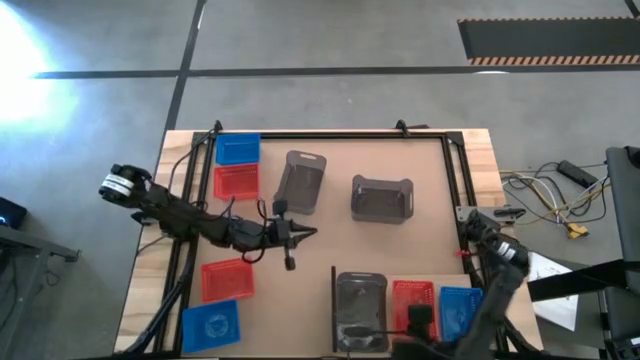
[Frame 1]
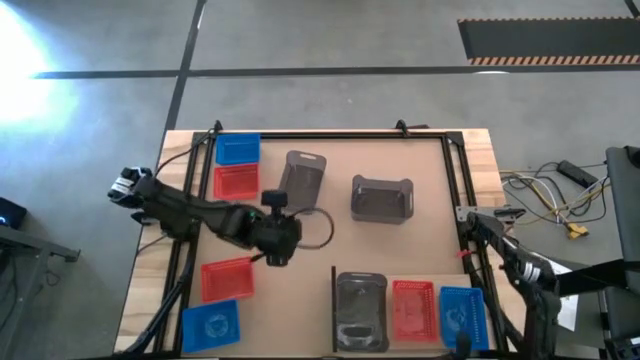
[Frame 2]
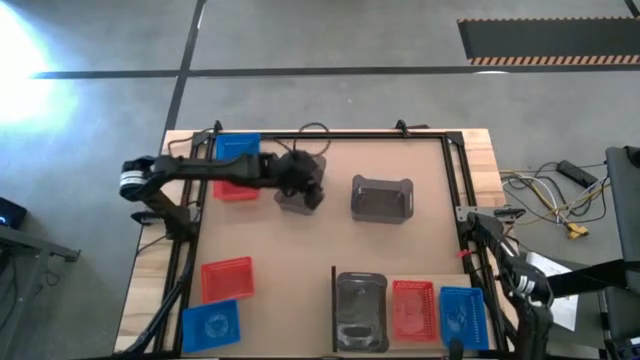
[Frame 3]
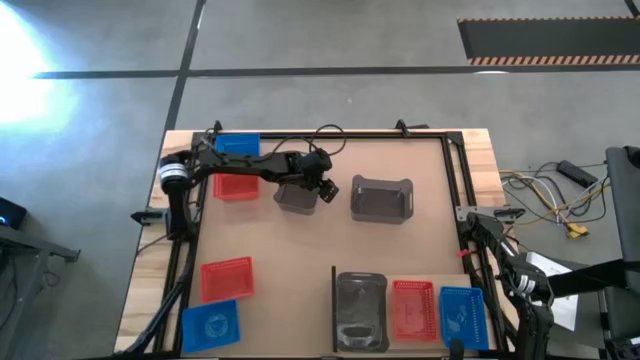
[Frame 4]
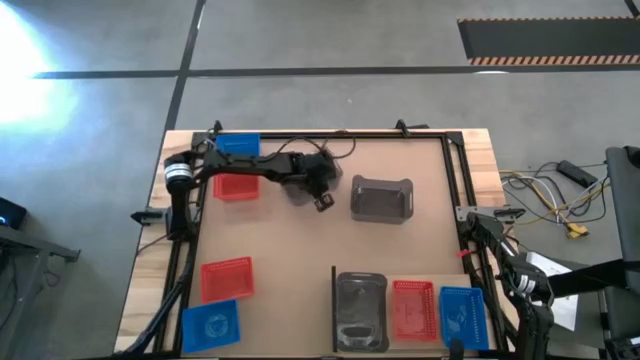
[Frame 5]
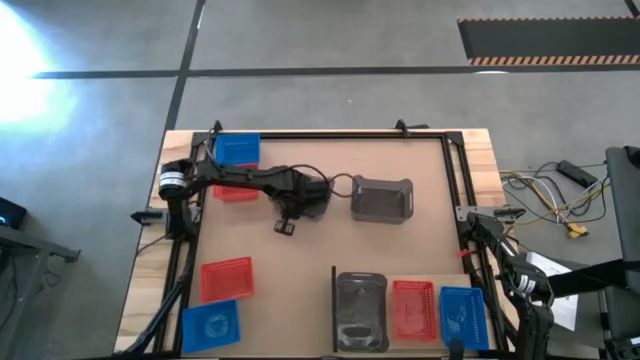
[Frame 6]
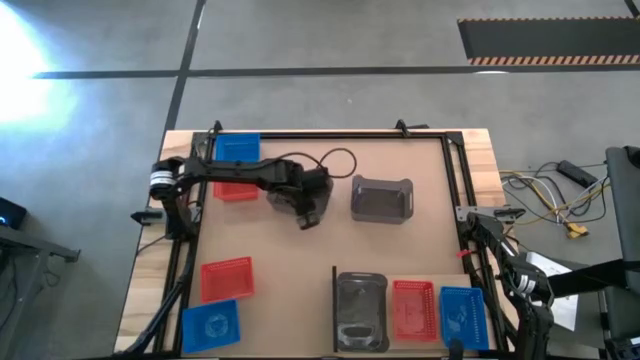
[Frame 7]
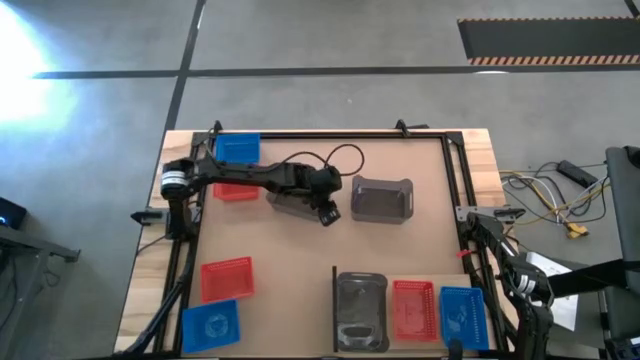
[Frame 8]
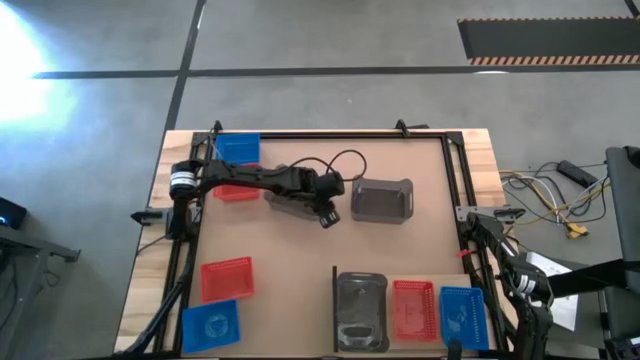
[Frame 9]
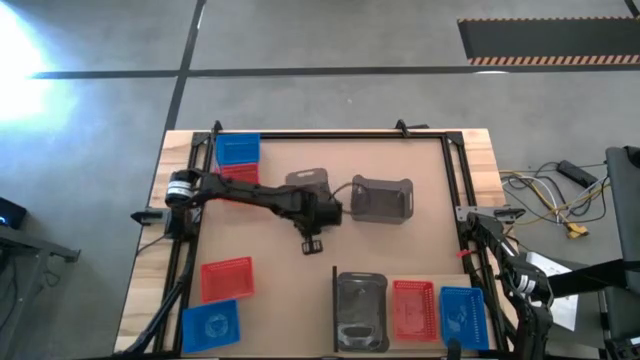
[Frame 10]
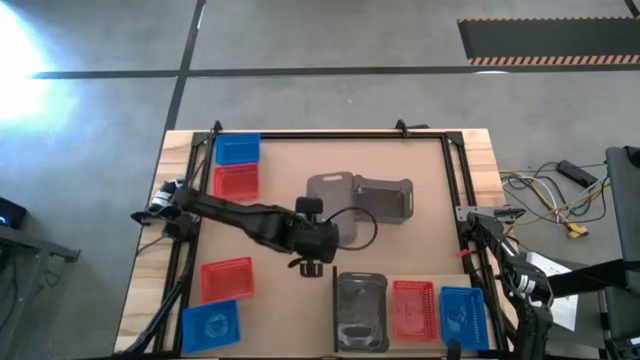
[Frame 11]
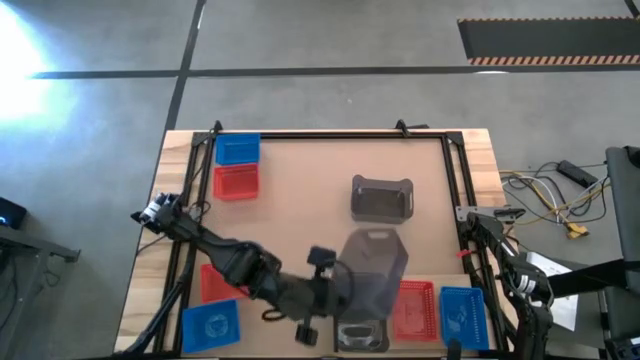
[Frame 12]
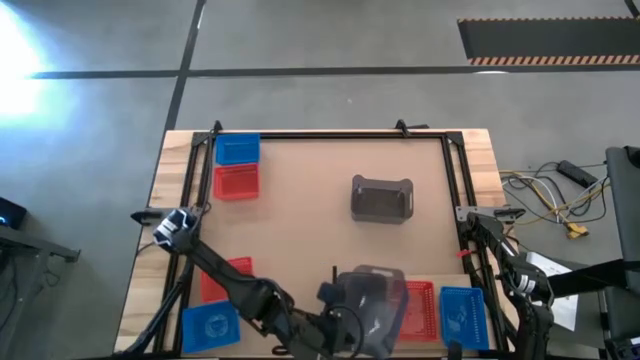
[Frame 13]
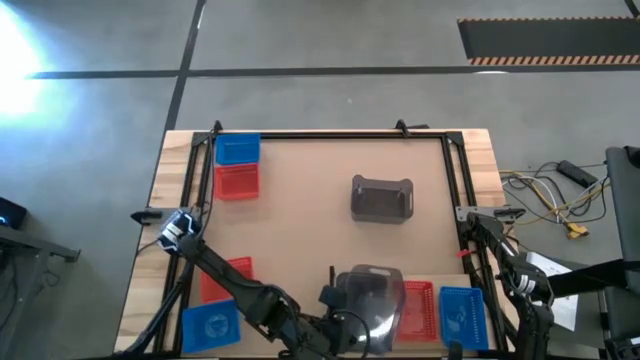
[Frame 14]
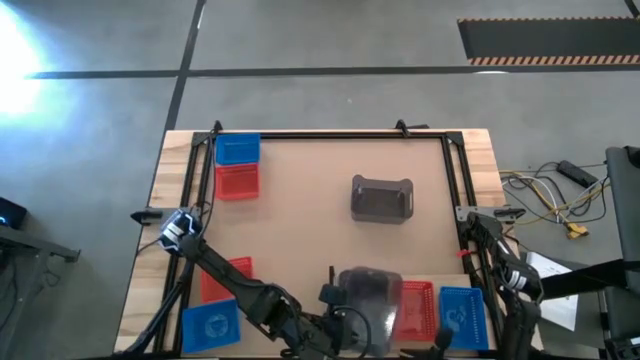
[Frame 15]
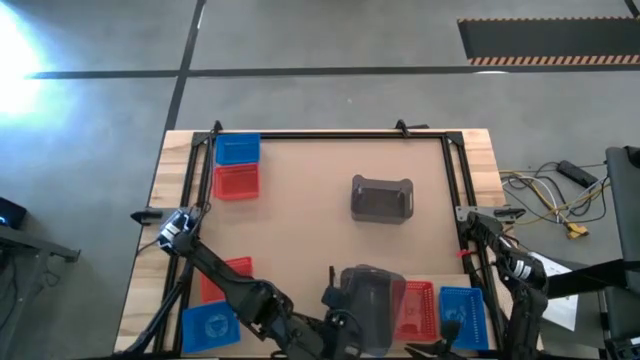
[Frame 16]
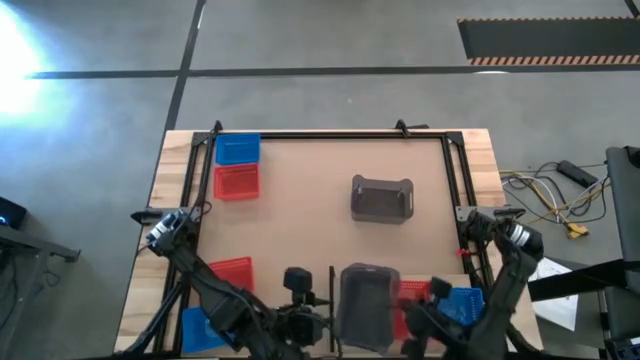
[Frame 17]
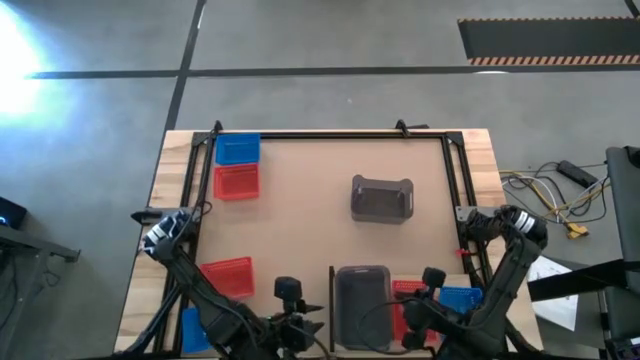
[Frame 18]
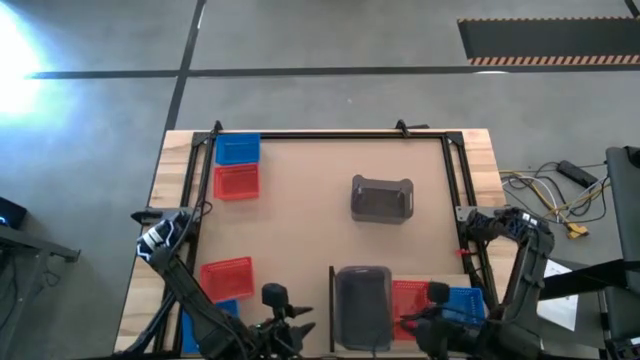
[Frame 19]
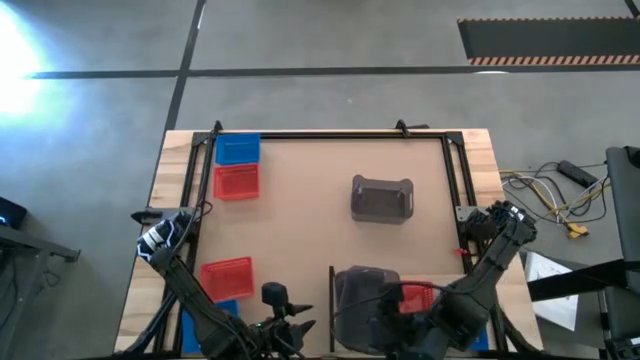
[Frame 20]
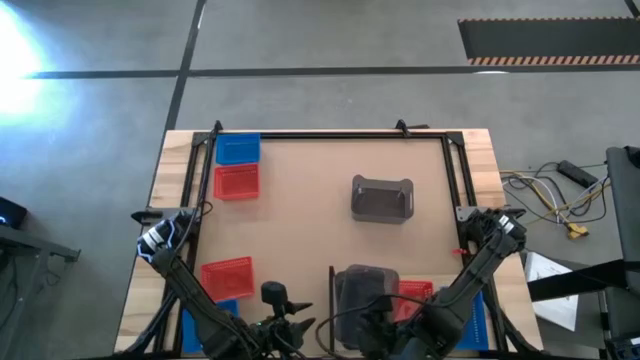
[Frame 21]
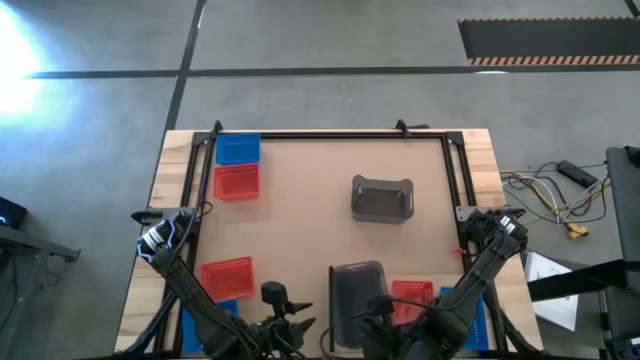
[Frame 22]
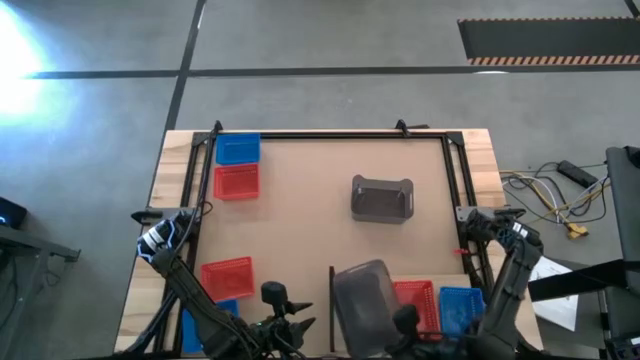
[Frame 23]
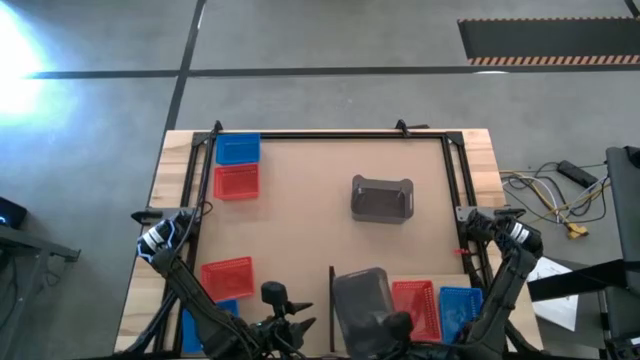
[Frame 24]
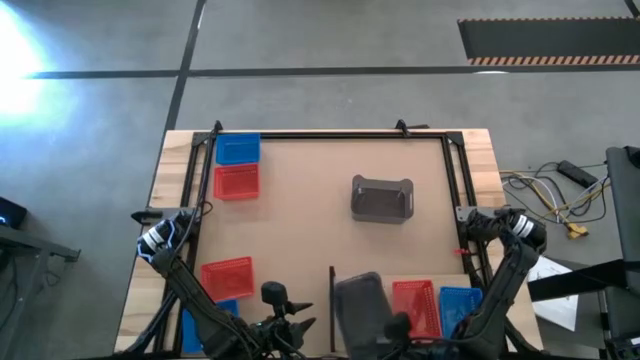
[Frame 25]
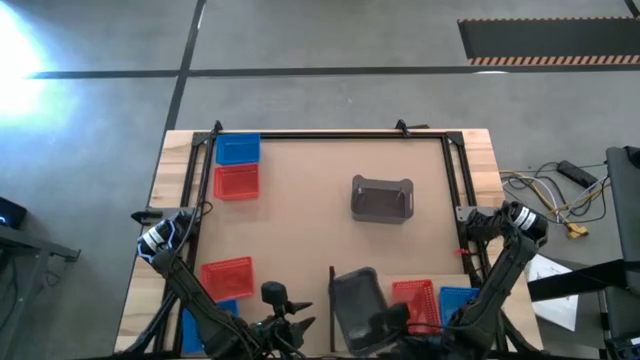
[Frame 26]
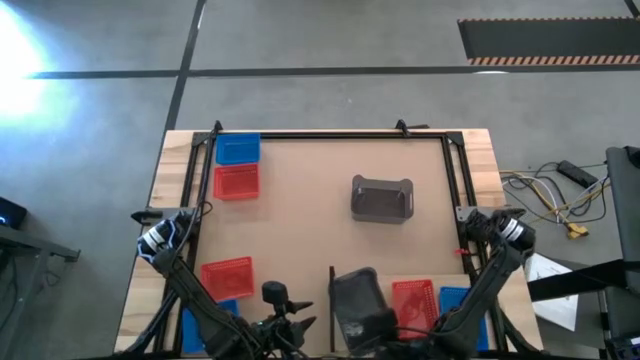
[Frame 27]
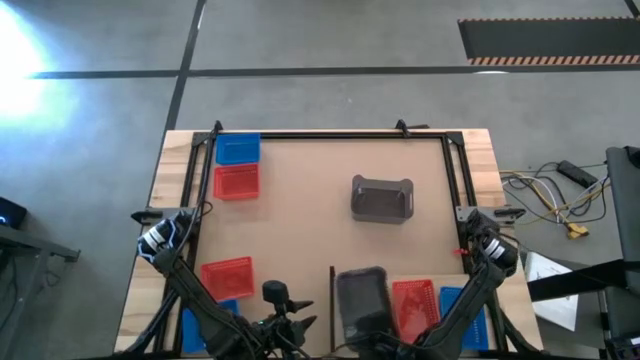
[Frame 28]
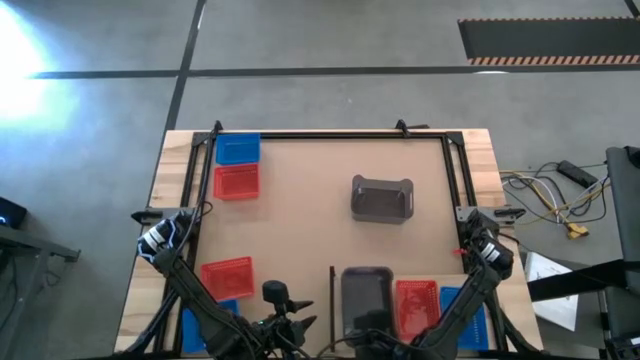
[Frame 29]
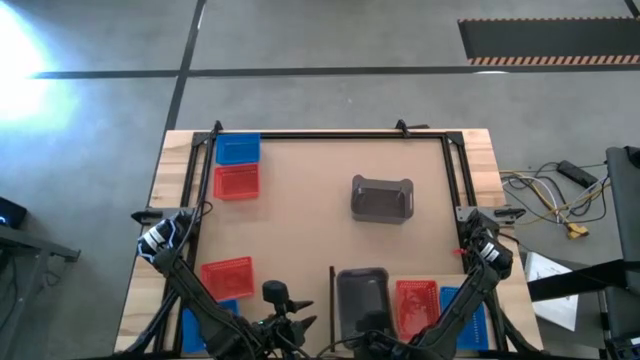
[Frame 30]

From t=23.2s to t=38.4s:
Task: Stack baskets on shelf by color
Stack the left black bin on top of the black bin on the shelf

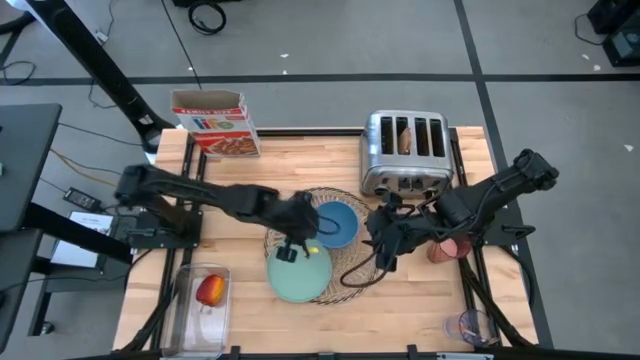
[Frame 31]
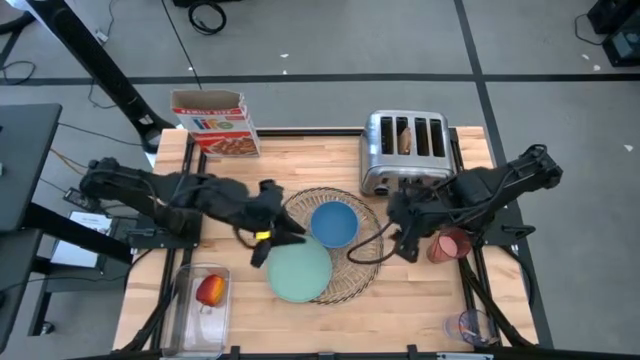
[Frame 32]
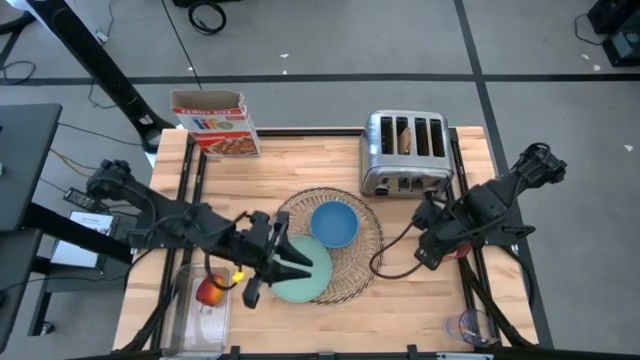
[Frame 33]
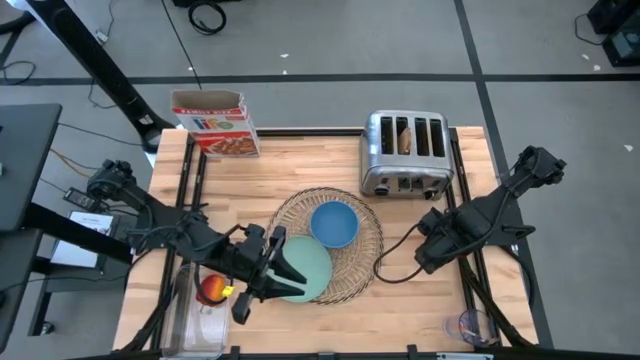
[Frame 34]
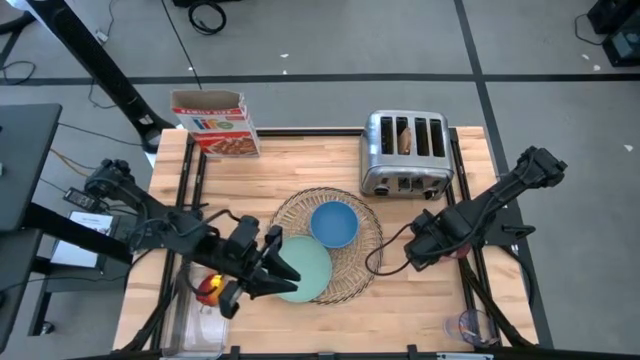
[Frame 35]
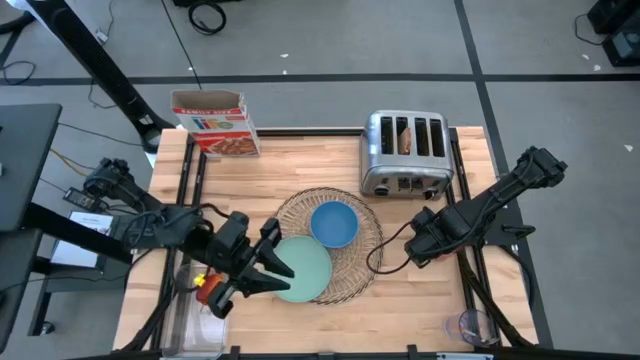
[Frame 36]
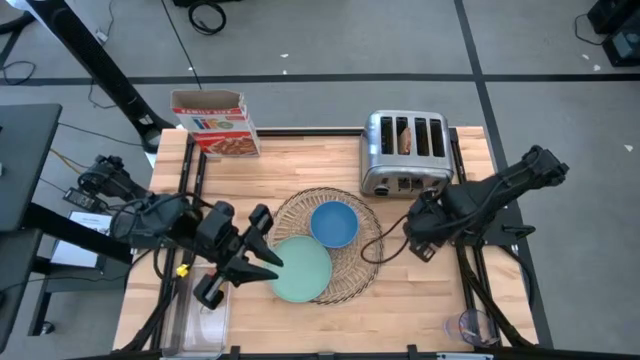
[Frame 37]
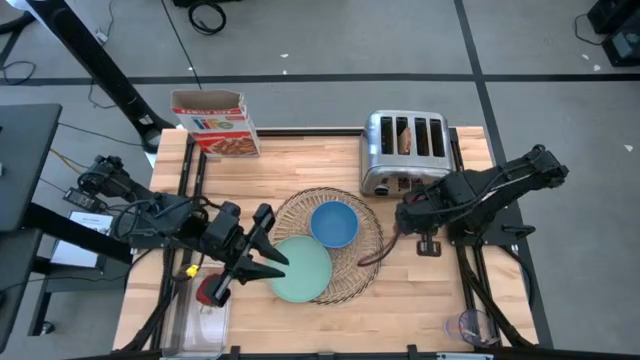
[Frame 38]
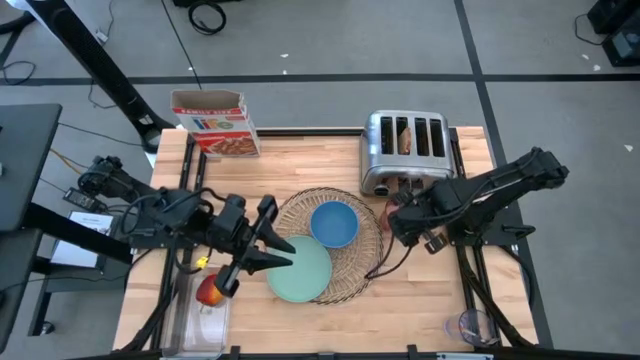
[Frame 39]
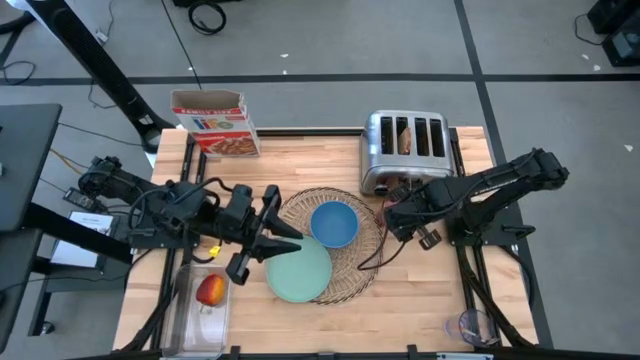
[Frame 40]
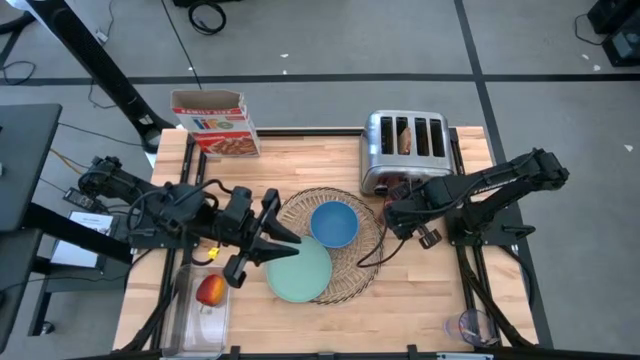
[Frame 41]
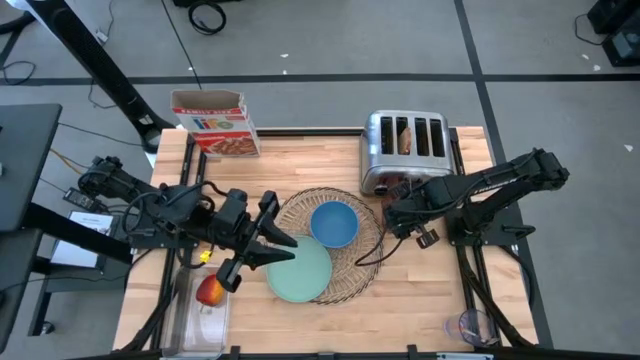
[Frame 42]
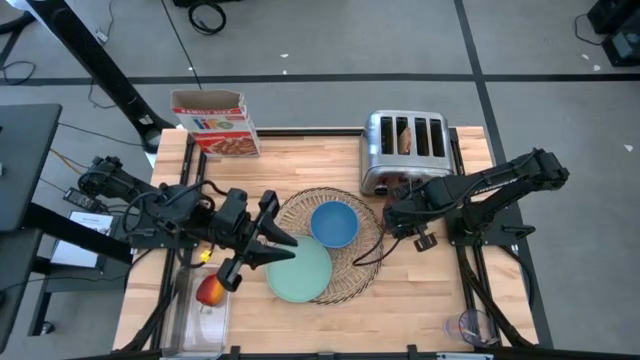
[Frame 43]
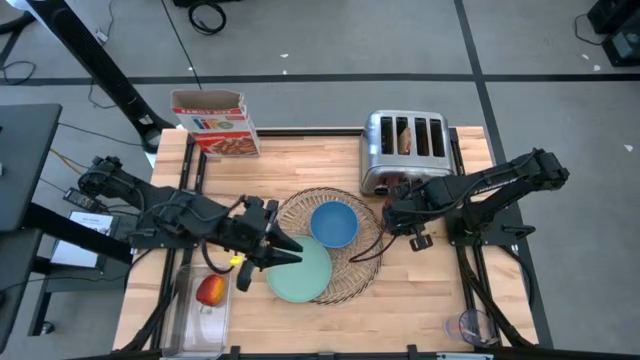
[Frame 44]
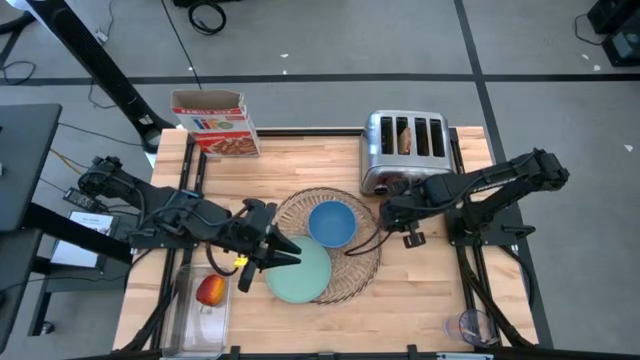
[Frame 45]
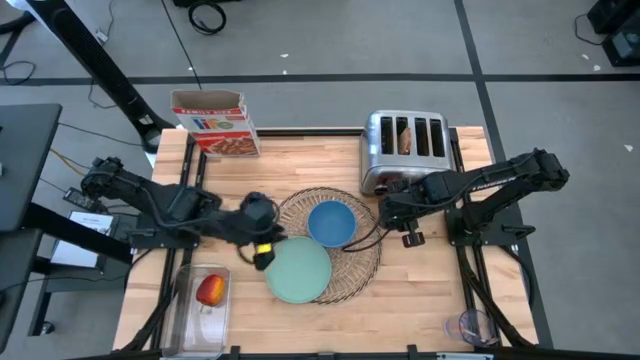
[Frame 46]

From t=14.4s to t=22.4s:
Task: Arrange a breakfast setting
Move the pink glass of milk to the middle right of the table
